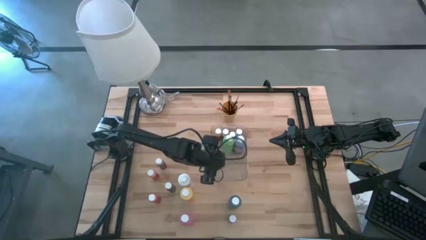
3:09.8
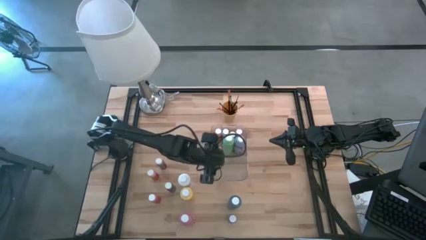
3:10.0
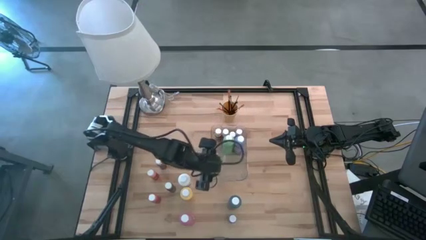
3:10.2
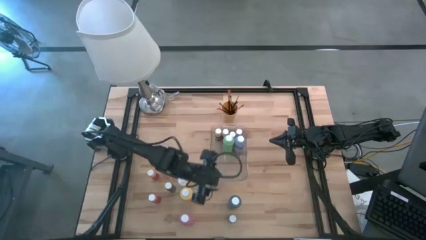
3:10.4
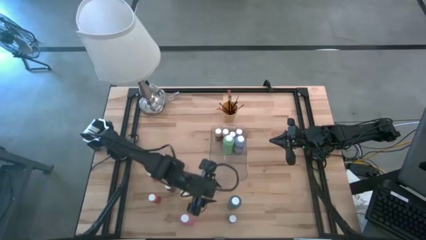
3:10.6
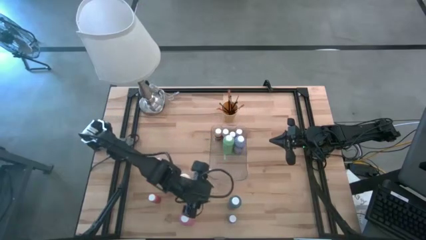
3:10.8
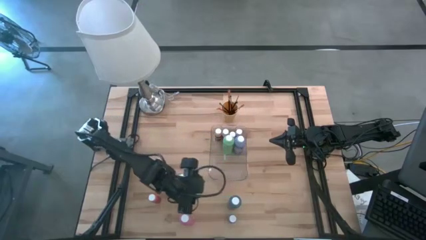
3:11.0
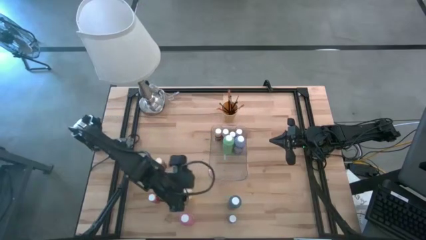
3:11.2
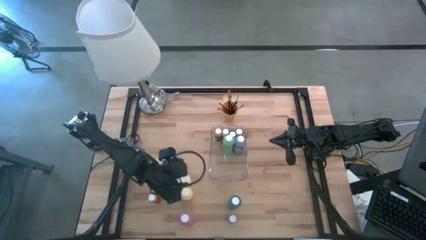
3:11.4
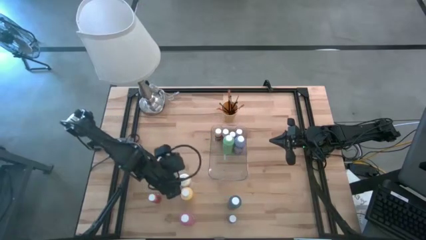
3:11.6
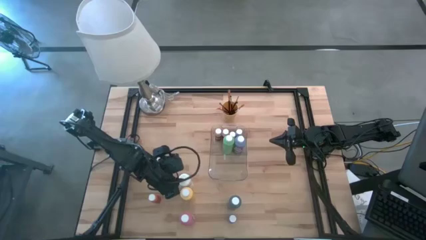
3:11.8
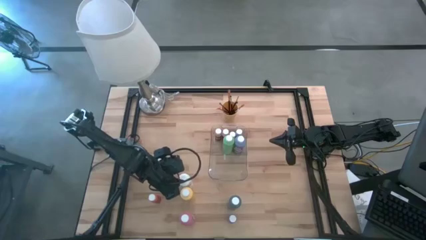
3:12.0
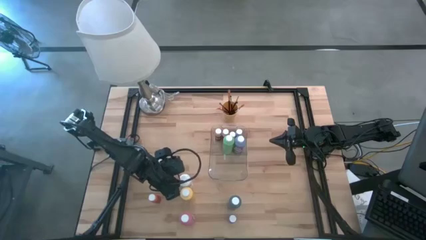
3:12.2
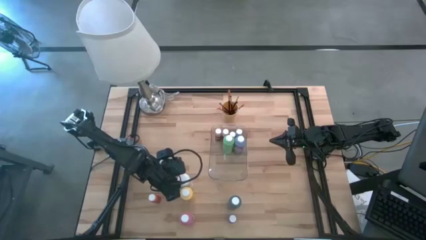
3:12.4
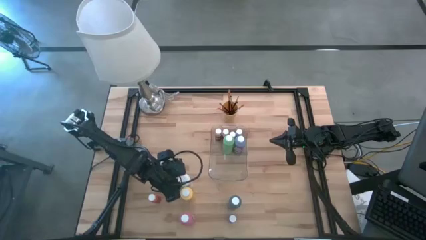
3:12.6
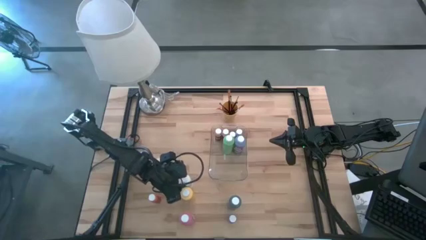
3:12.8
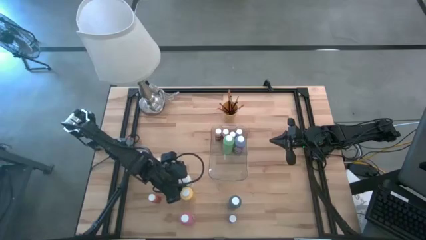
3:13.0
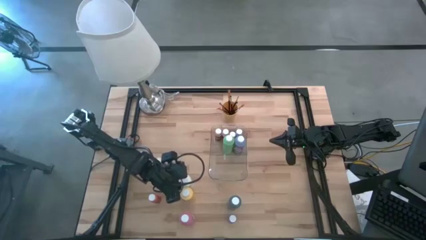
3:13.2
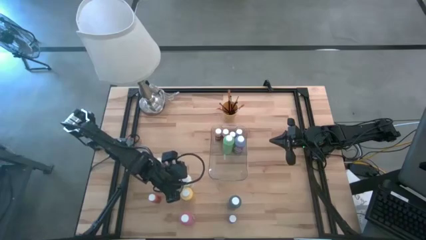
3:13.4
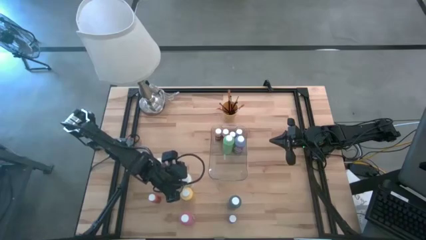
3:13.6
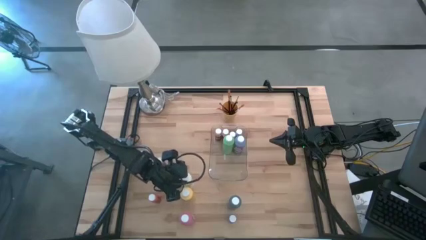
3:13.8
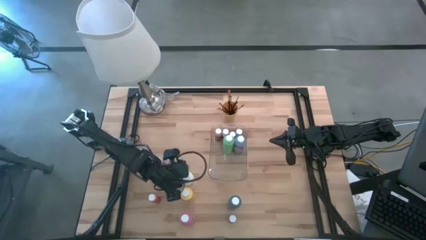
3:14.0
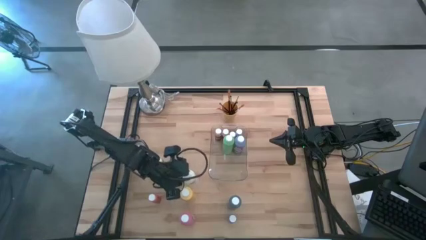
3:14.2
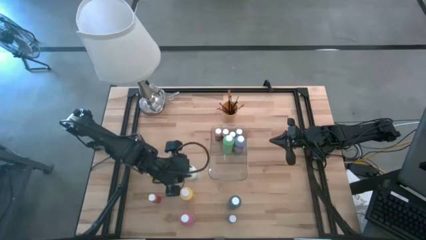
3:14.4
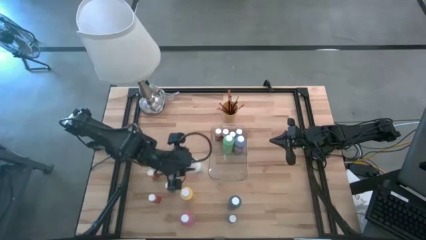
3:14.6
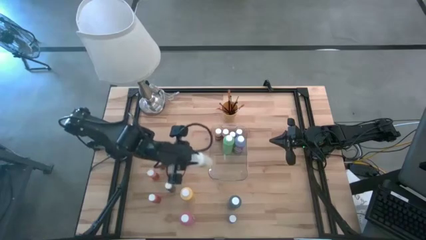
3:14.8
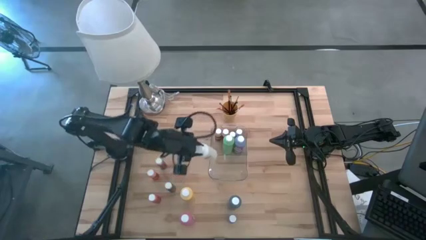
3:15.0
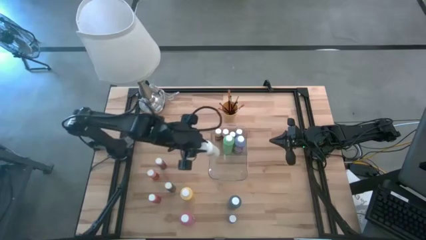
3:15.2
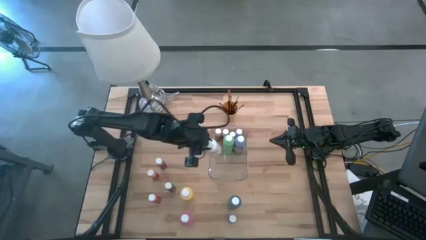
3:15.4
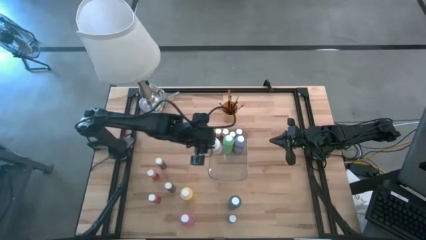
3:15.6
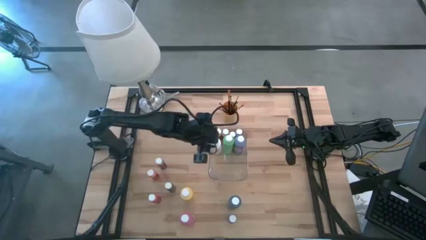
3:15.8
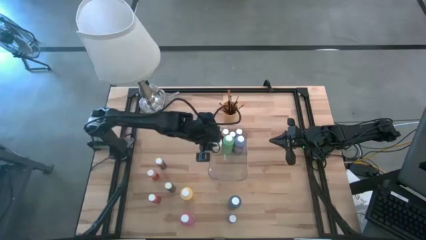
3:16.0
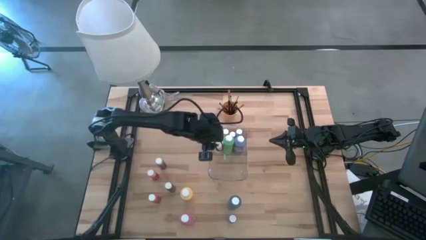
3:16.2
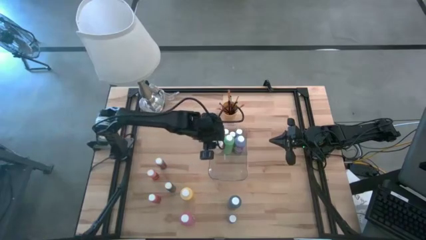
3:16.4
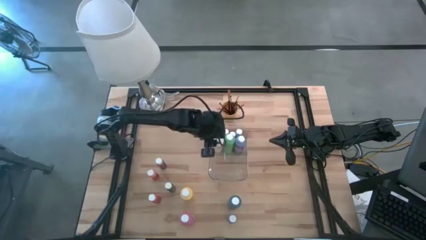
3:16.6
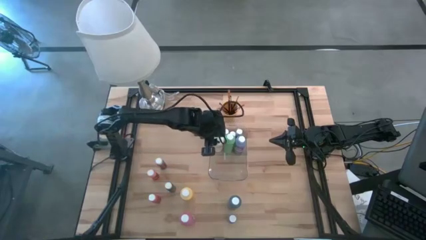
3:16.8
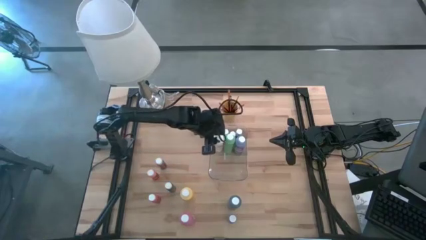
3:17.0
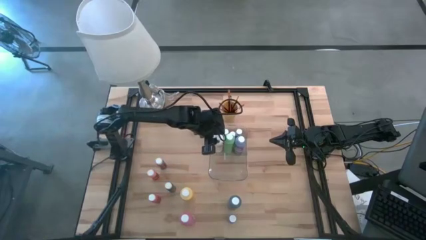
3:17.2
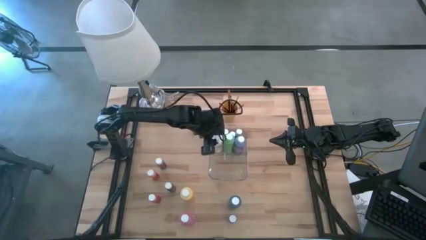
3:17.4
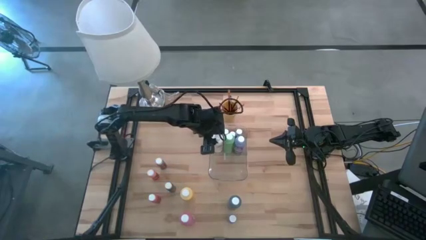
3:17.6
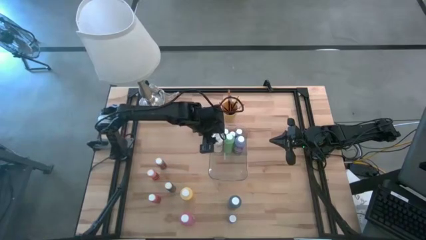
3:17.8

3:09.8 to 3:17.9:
Task: Pick & Place Paint Supplies
Put the large white paint bottle into the transparent bin

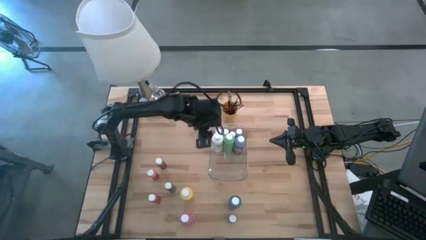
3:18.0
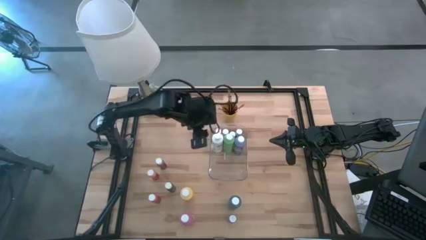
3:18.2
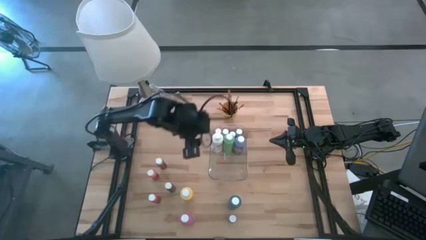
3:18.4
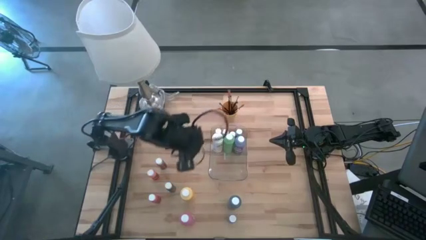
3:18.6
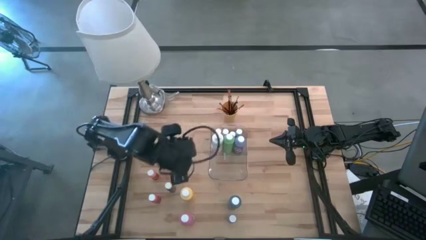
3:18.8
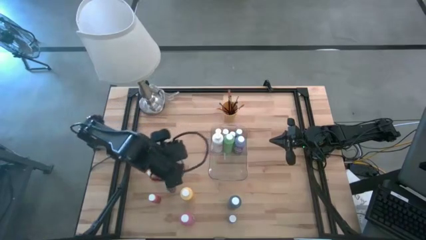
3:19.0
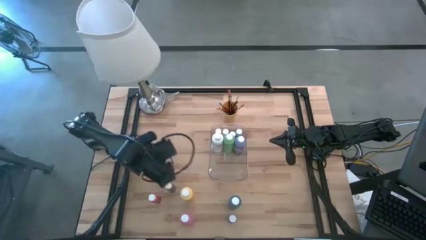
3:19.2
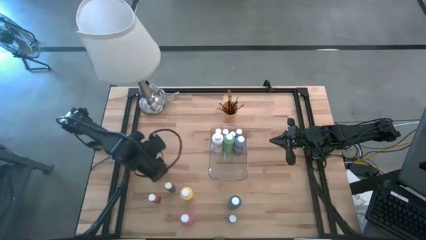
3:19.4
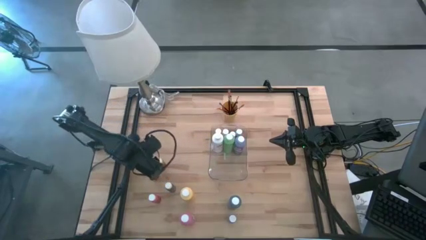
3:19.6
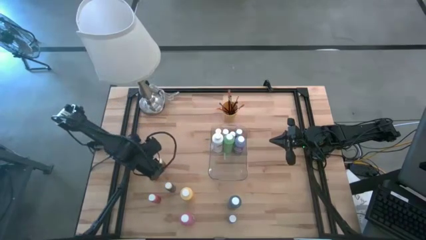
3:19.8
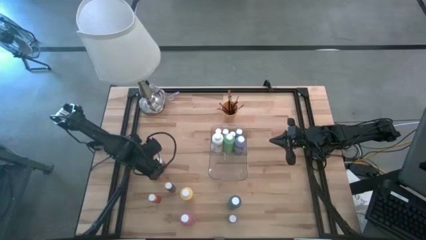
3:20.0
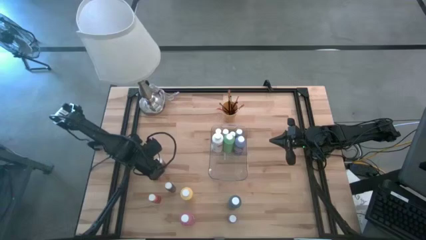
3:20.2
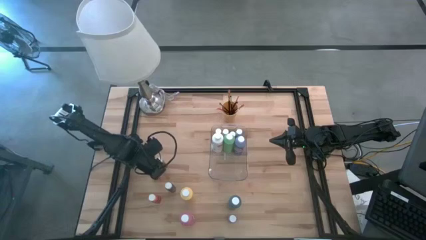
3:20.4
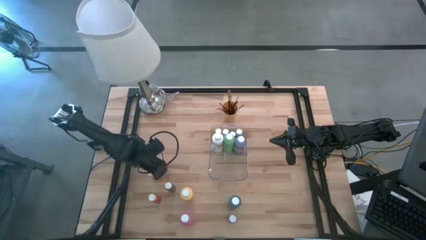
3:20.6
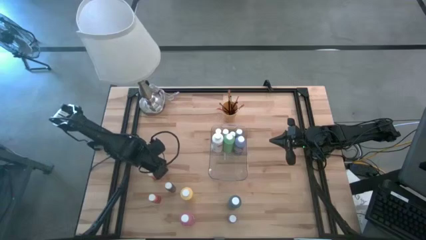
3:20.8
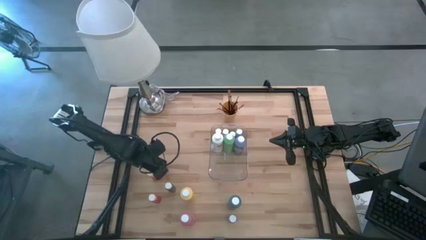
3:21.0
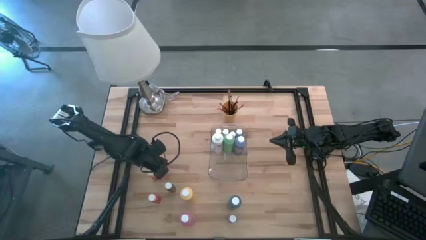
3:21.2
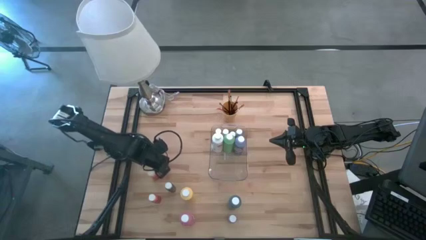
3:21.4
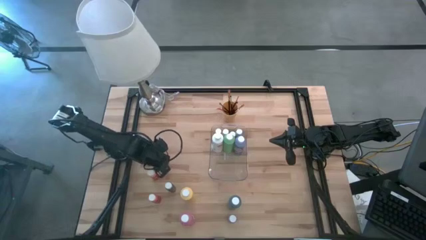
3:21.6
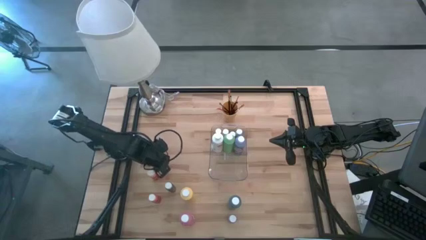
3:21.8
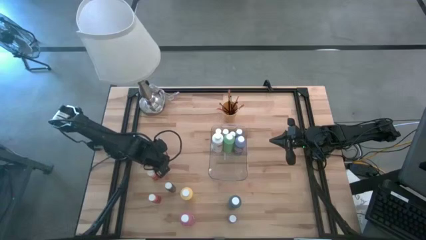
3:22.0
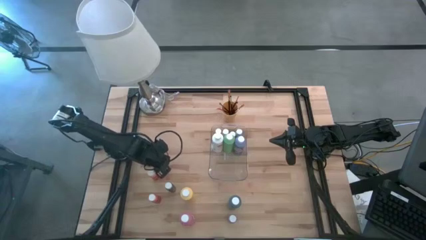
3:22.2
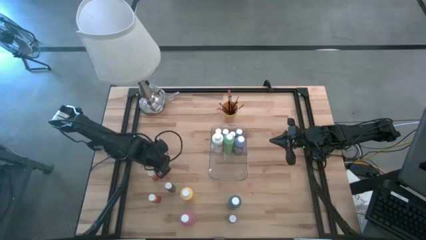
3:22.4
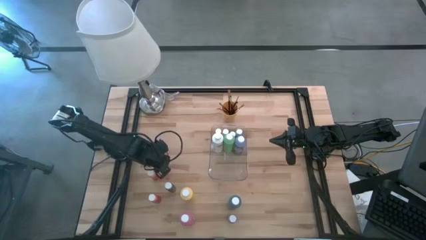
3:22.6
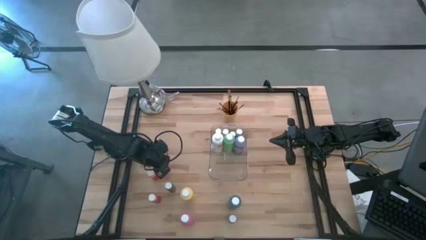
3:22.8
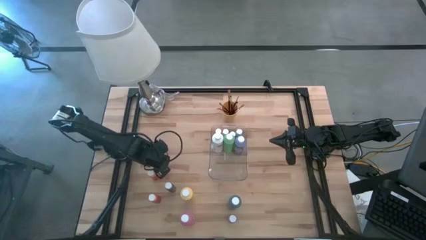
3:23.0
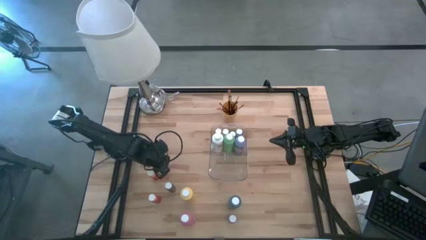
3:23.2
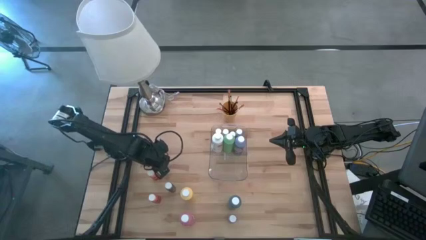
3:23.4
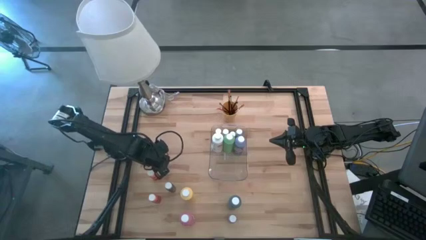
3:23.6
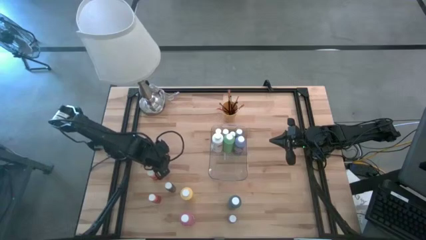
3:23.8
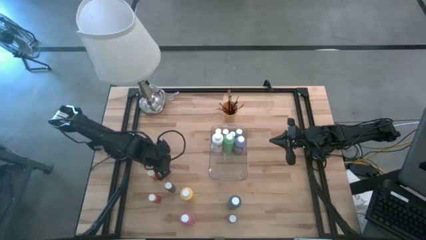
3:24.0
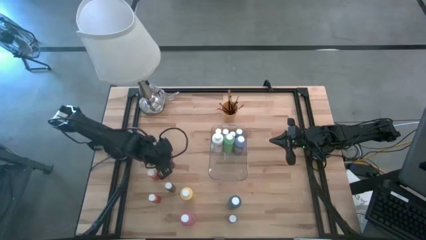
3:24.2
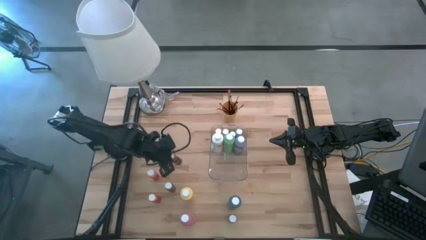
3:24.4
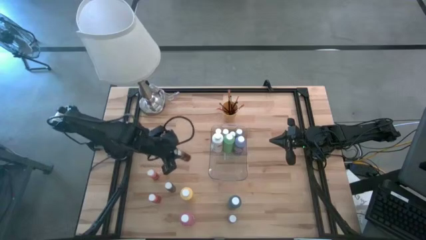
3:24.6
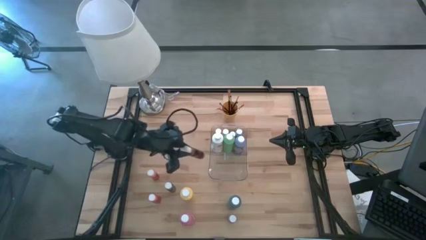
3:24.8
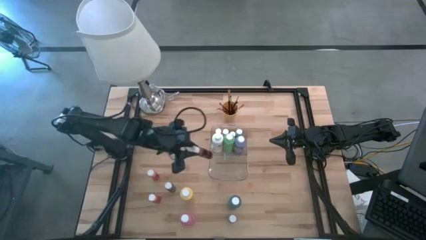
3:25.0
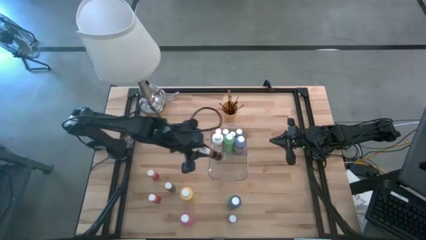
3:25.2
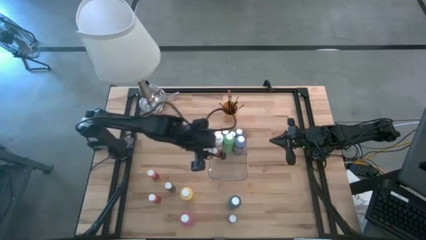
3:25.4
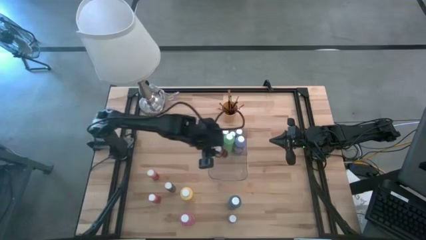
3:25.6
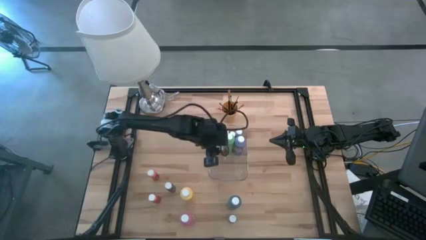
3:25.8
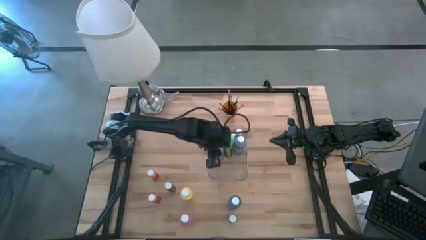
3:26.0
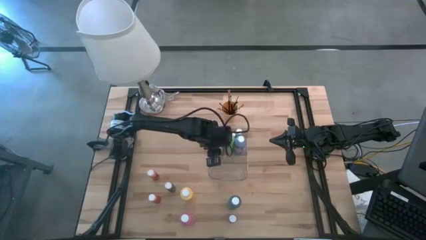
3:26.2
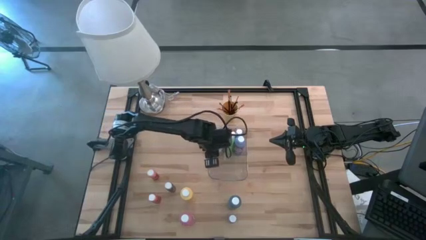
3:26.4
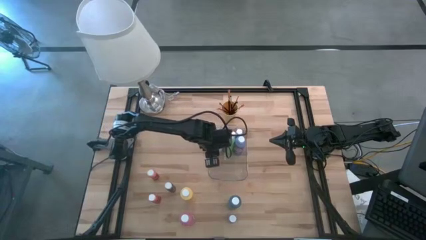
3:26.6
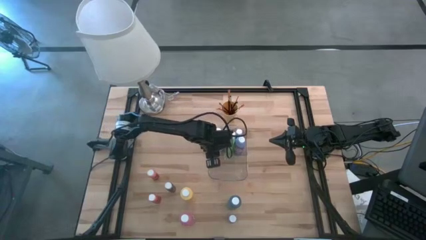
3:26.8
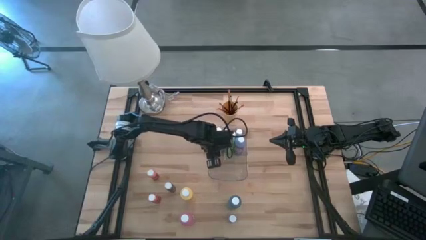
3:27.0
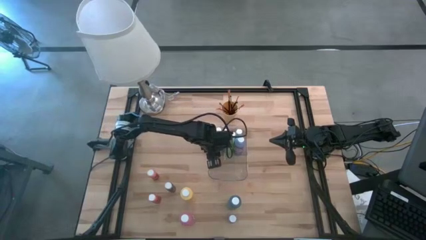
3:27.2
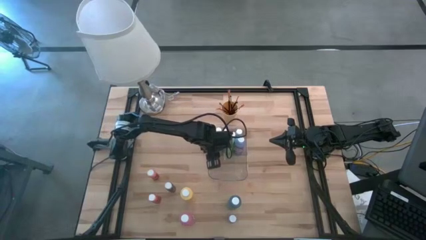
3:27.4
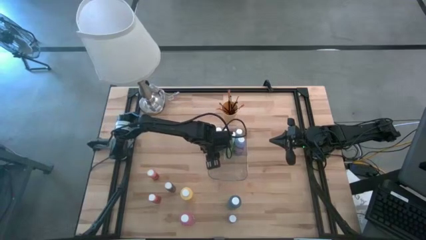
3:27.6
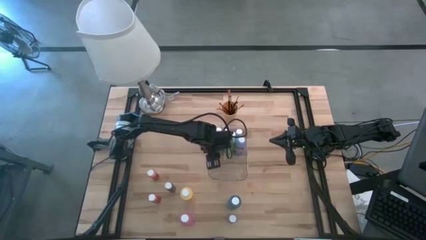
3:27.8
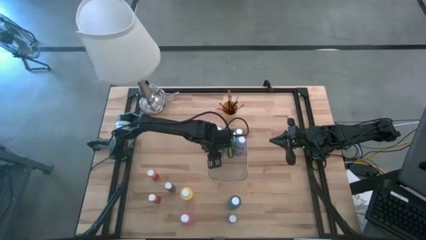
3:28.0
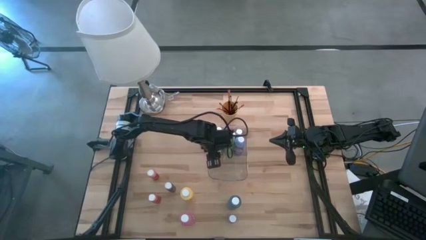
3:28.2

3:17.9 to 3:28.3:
Put the small brown paint bottle into the transparent bin
